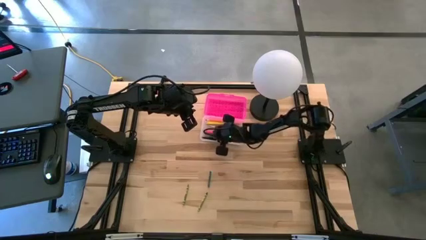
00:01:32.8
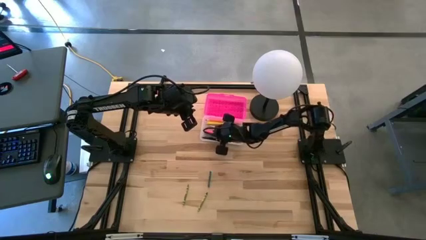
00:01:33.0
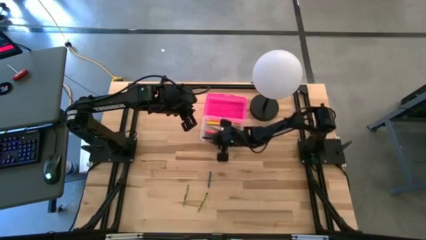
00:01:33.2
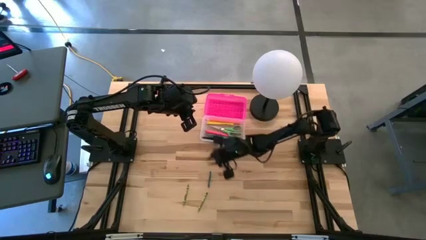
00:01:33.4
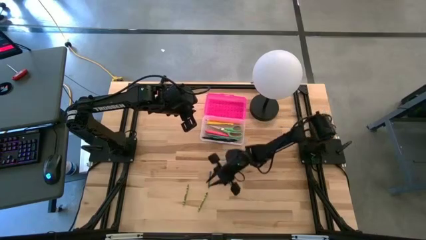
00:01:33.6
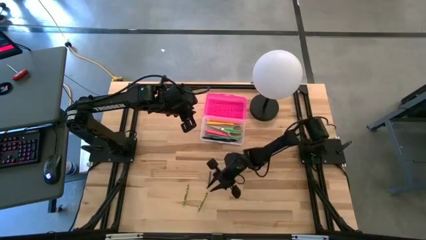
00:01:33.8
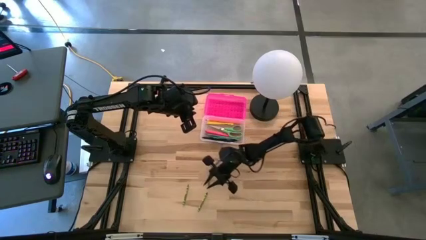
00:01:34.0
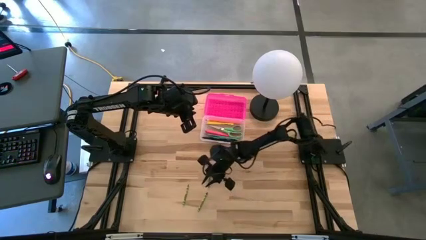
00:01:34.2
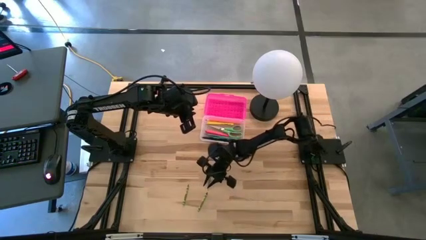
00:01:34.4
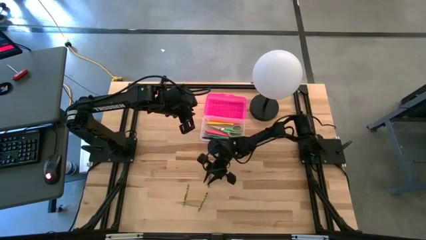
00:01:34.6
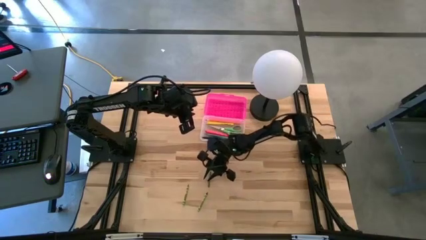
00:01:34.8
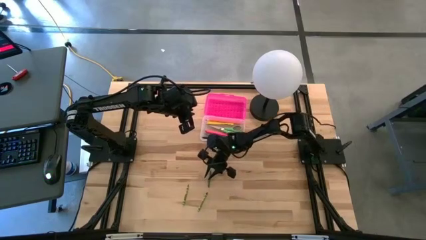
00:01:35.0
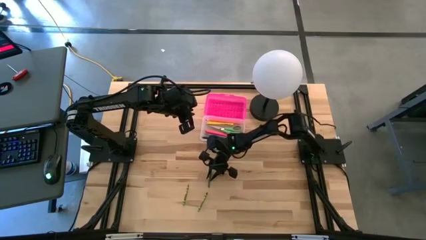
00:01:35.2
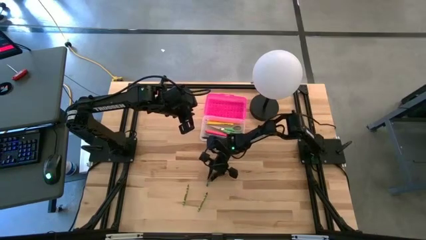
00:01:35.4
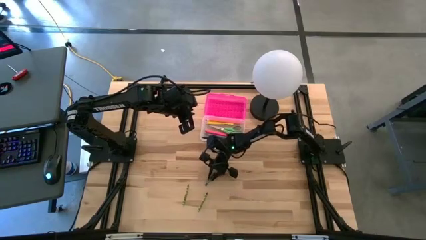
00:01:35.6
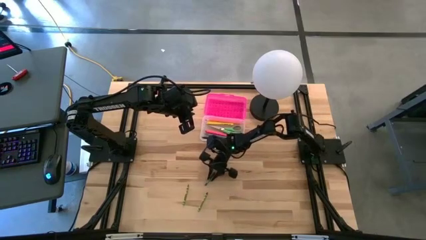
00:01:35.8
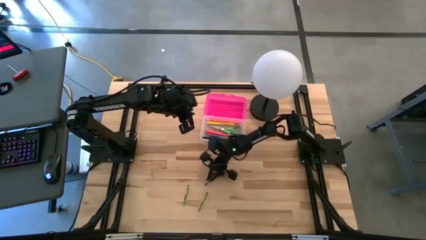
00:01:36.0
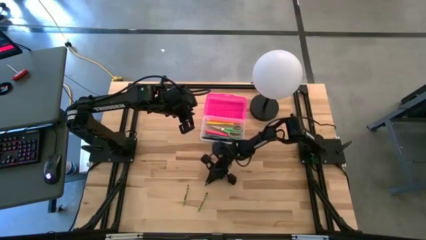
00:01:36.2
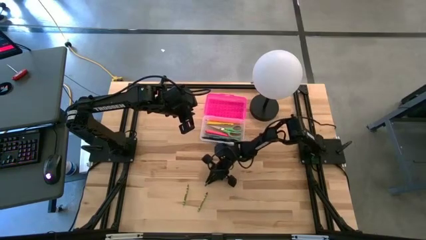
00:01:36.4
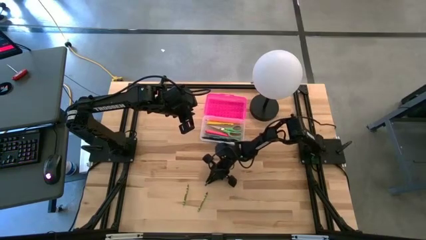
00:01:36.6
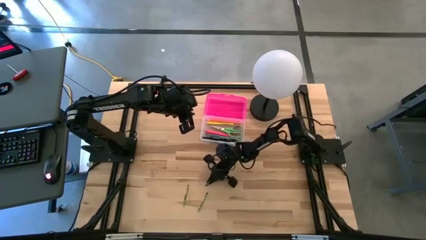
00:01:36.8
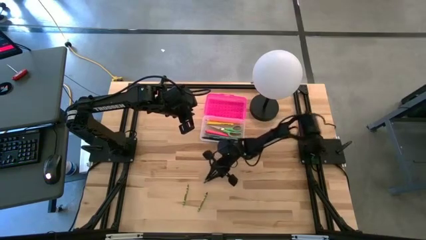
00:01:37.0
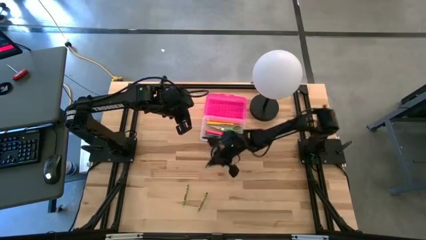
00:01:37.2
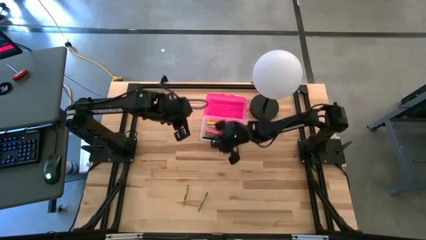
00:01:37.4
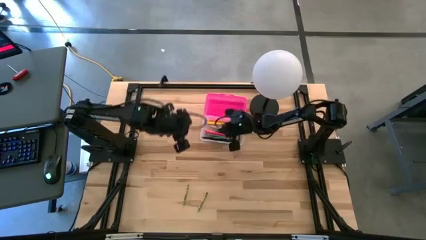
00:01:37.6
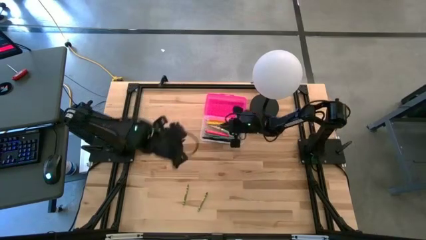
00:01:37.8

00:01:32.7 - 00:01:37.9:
Task: Pick & place school supplies into a supply box
Put the dark green crayon into the transparent supply box

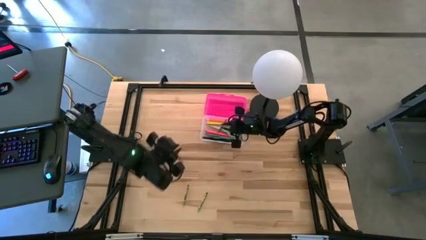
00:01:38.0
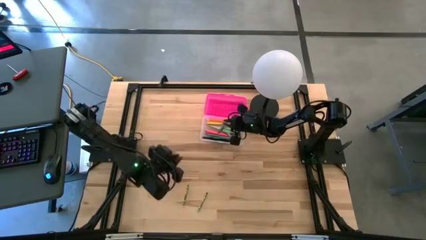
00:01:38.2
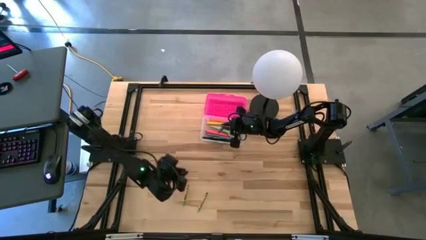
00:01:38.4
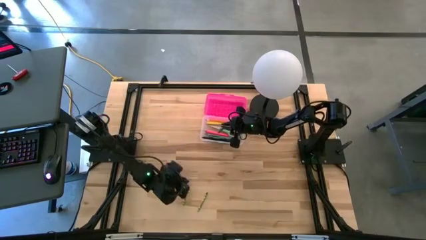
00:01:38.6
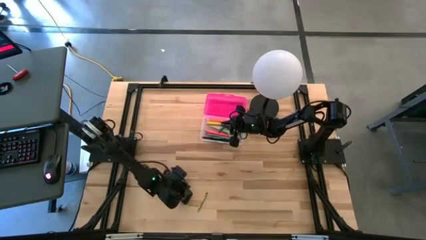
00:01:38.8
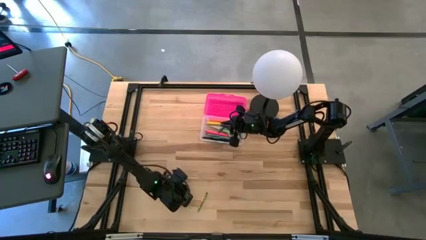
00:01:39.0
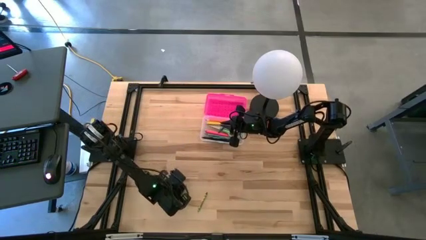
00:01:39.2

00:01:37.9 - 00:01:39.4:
Put the left green crayon into the transparent supply box

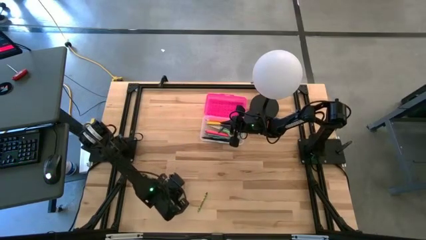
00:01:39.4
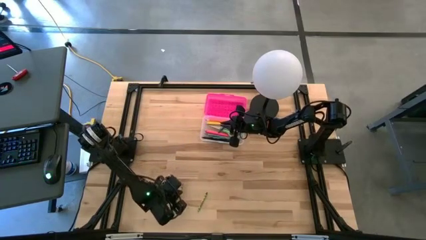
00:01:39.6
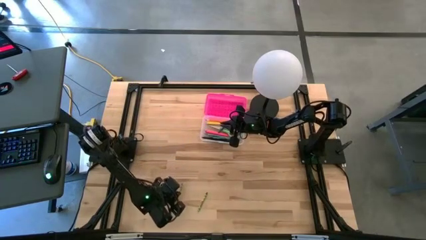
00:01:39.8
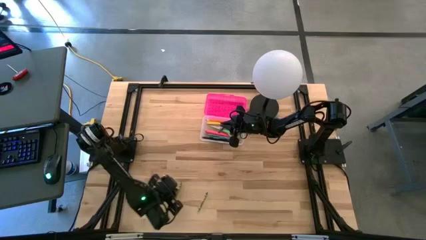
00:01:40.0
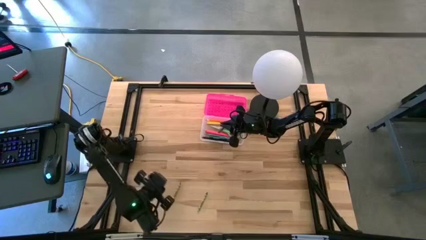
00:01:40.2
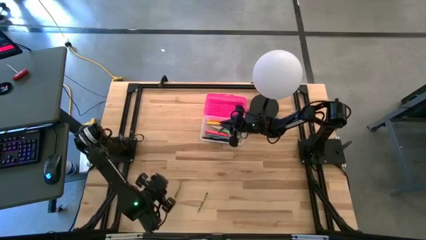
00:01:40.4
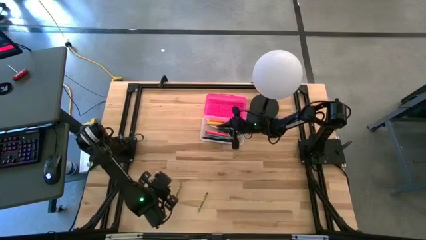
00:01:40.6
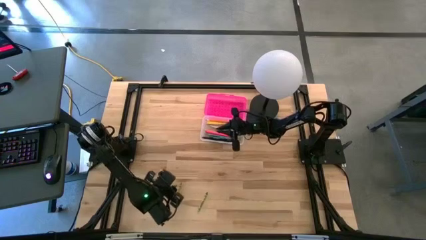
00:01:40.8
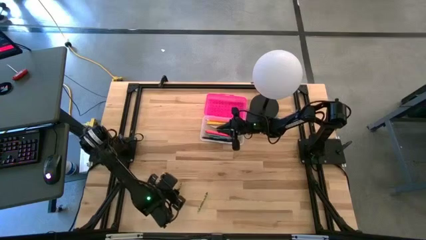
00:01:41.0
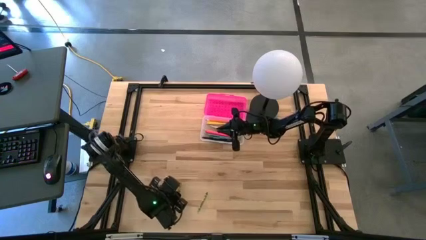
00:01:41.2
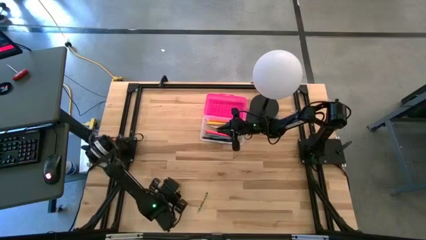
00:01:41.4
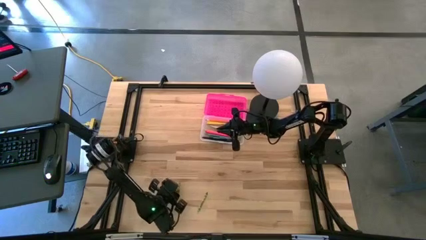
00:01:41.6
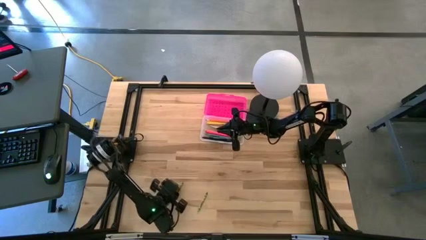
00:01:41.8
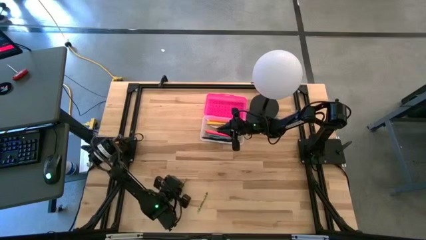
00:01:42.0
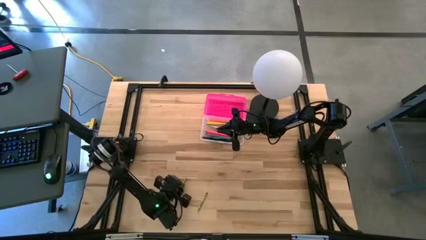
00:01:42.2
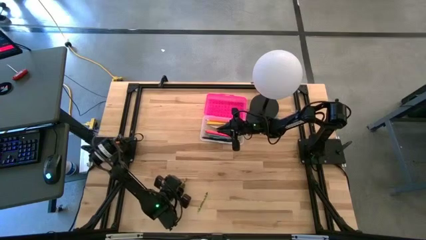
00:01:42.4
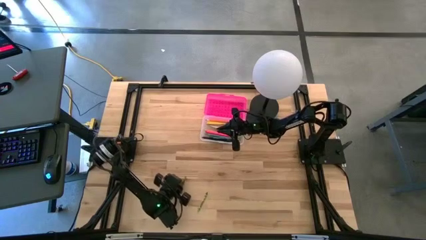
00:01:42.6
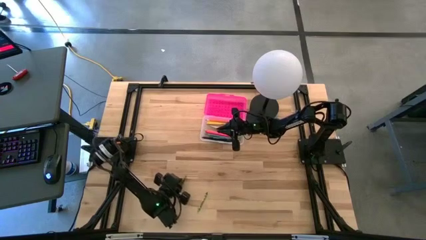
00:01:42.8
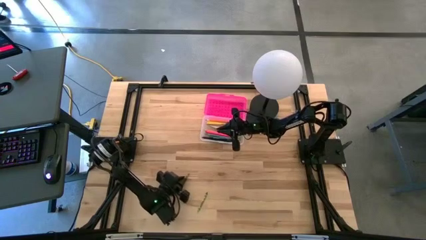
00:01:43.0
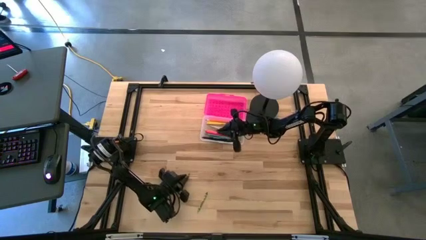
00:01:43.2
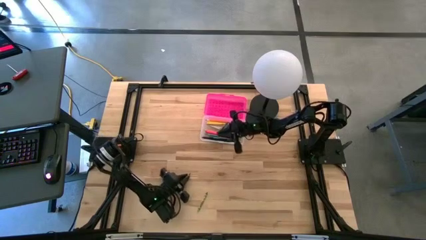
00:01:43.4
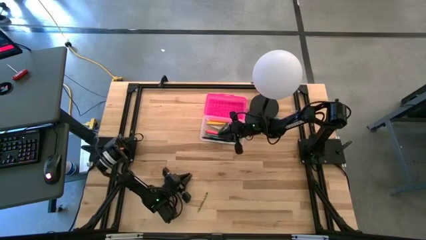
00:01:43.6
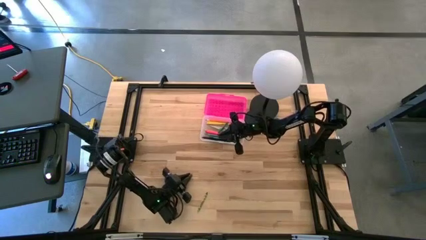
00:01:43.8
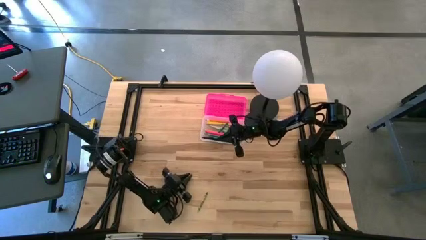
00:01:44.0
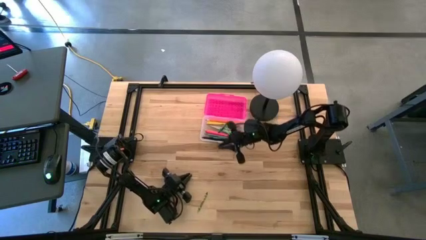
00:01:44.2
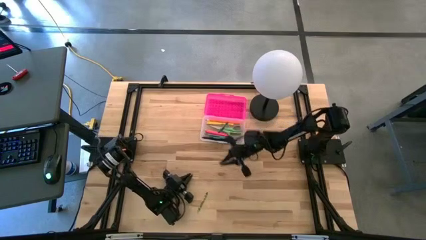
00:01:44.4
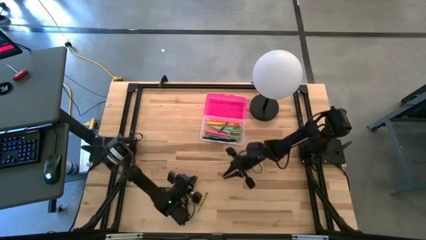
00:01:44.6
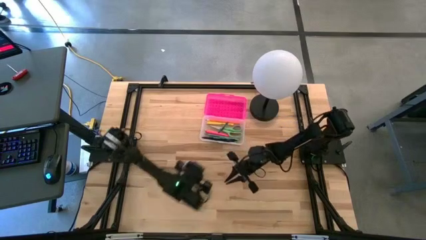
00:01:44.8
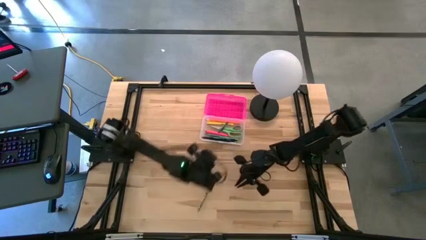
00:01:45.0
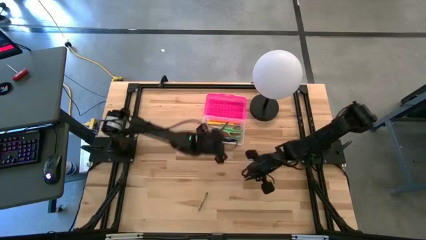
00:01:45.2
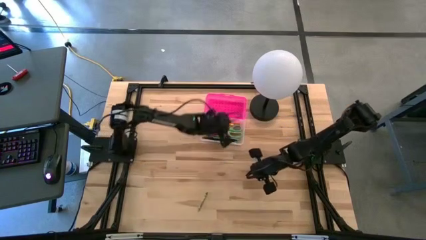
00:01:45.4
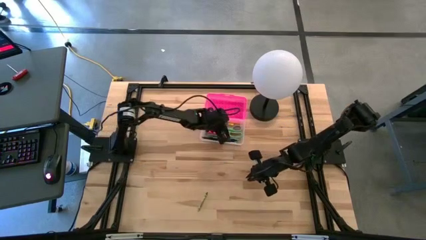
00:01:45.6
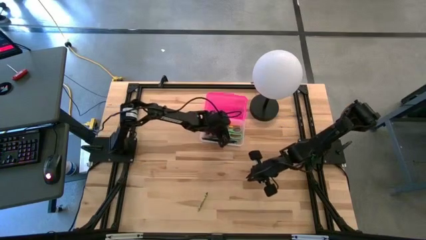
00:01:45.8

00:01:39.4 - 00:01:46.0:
Put the left green crayon into the transparent supply box

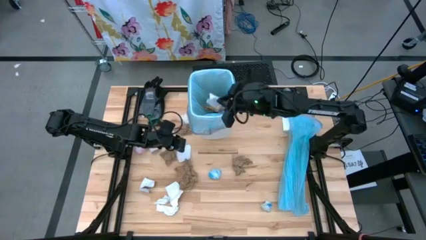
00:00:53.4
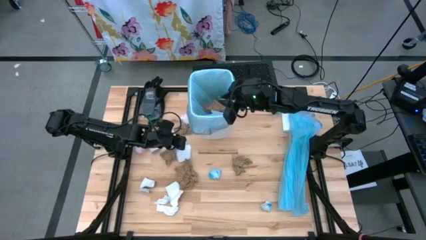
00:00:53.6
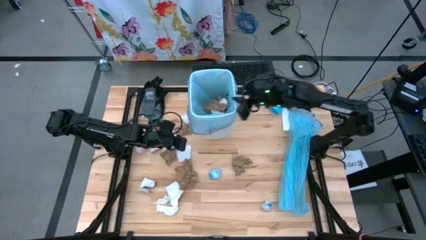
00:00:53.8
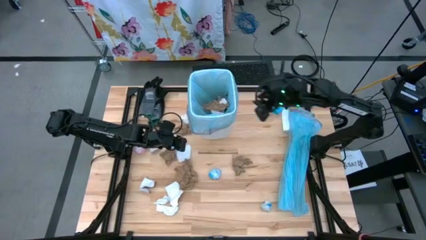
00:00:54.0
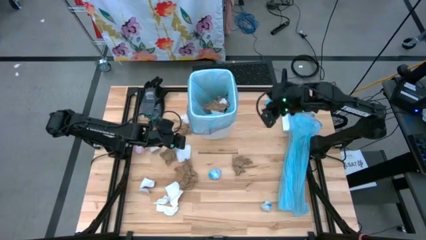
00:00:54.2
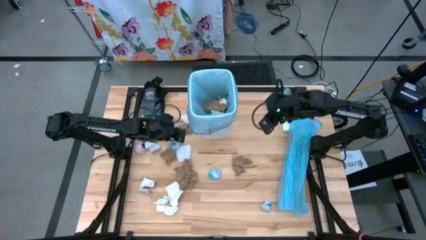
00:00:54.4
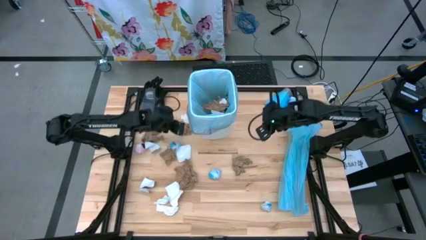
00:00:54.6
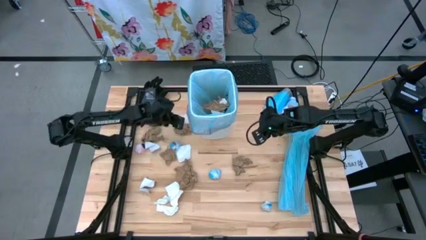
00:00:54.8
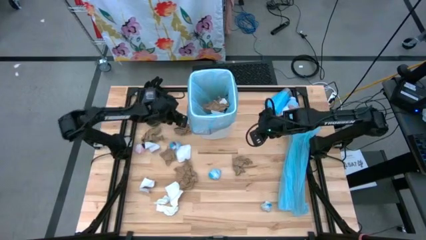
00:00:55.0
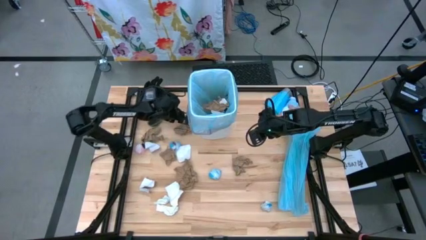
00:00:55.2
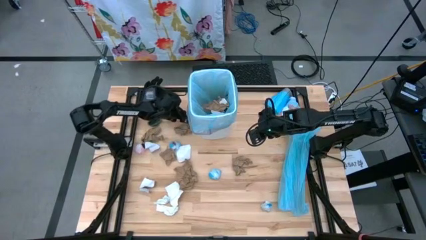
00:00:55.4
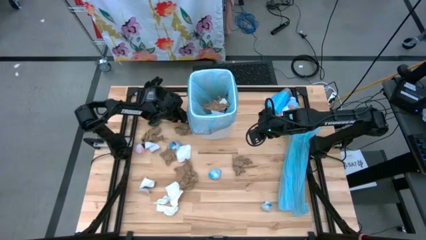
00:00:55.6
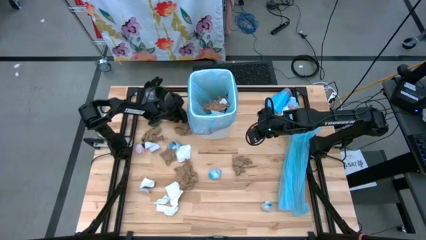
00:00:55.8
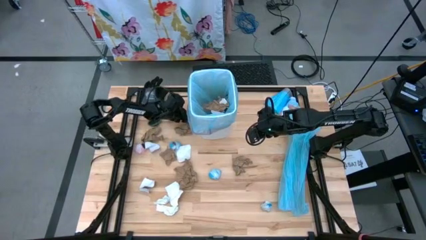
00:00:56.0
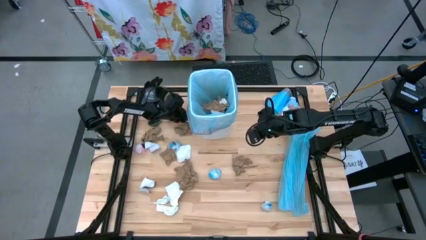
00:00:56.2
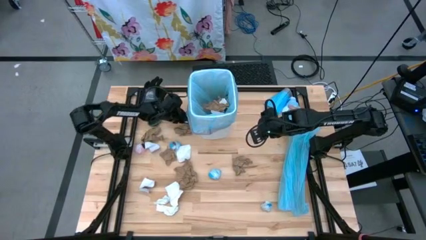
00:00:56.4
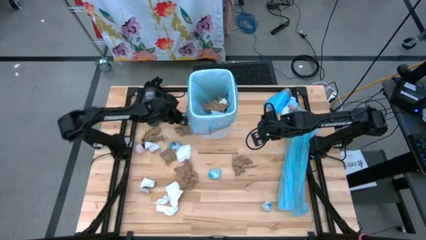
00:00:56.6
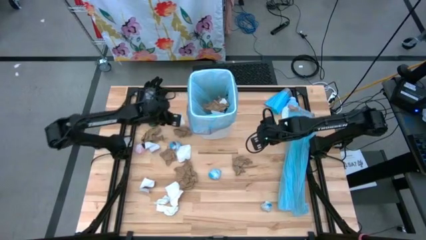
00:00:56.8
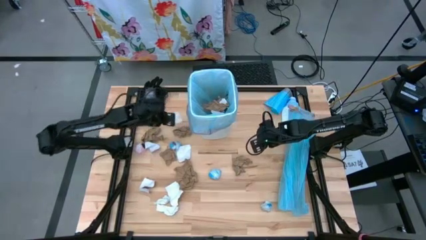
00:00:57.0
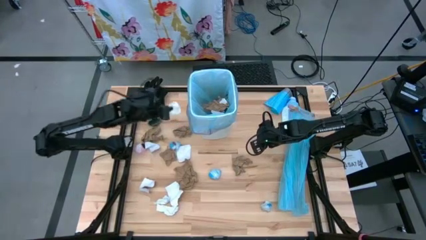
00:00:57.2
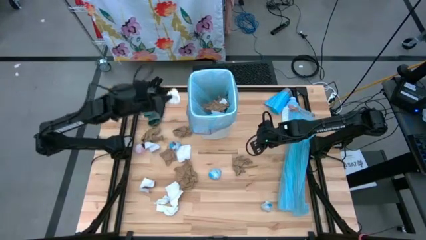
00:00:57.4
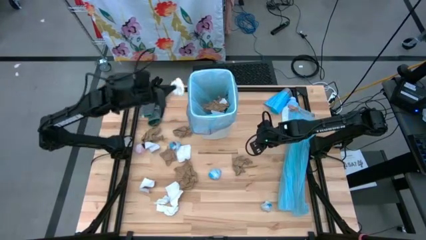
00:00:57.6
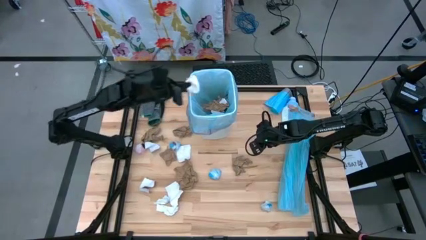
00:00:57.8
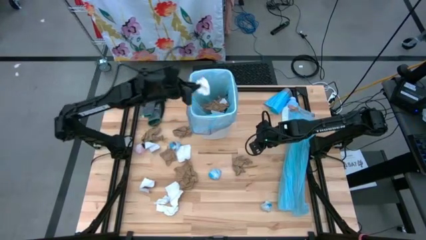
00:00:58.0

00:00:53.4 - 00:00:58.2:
Task: place trash/remove bag and relplace
Put the white napkin into the trash bin
